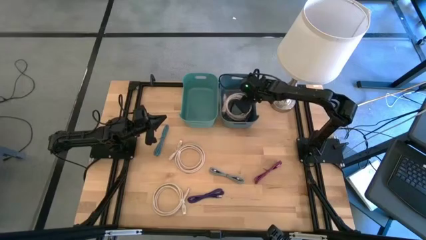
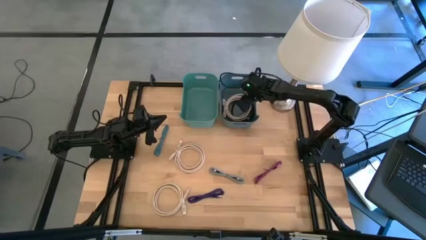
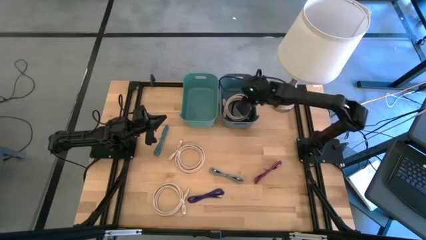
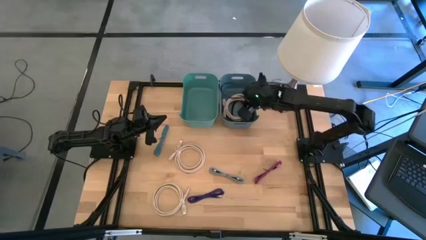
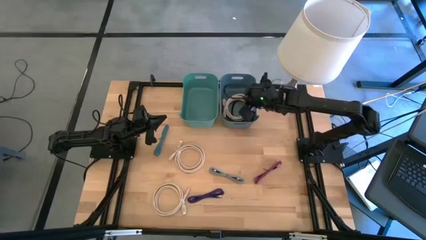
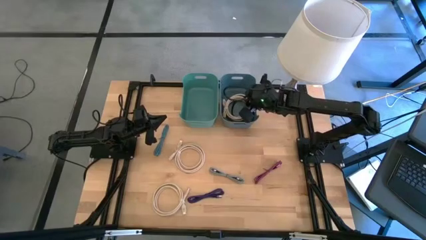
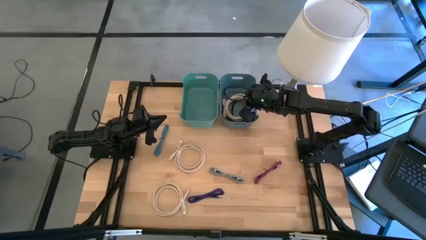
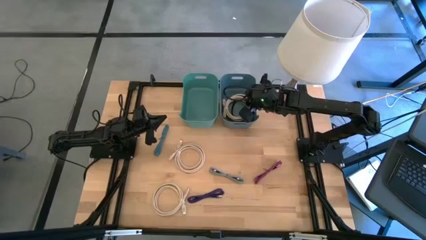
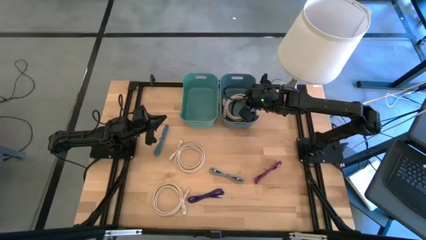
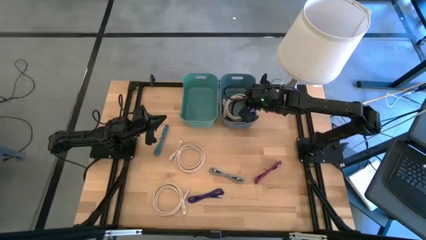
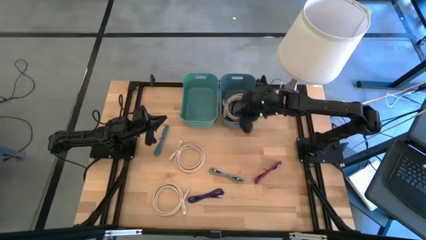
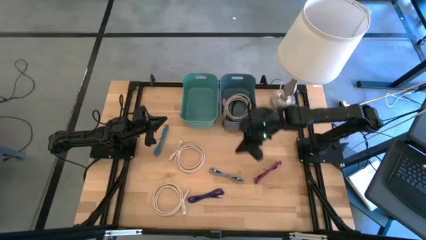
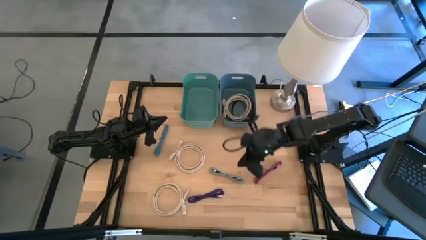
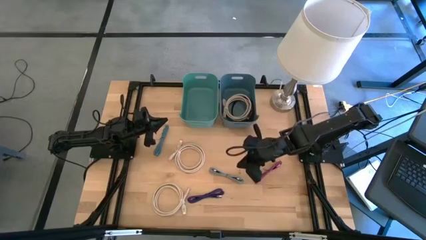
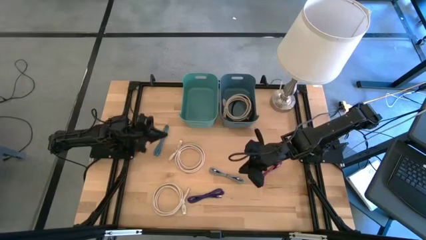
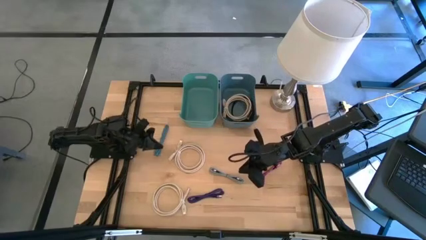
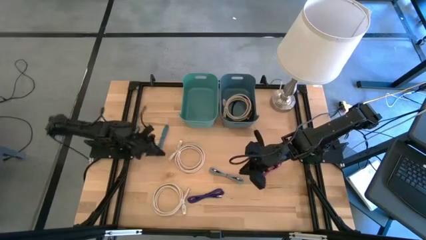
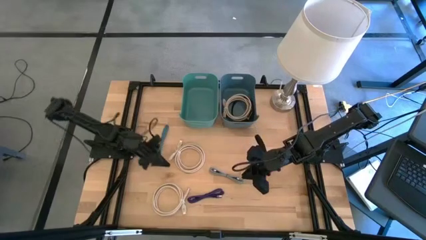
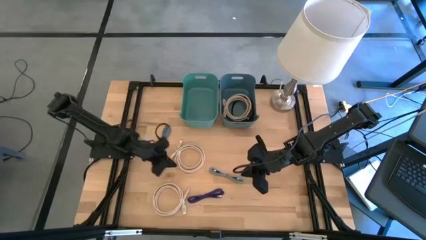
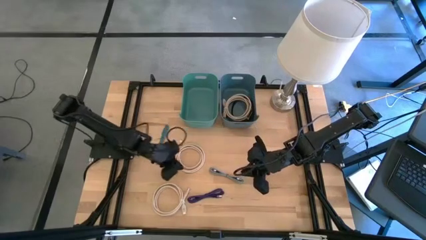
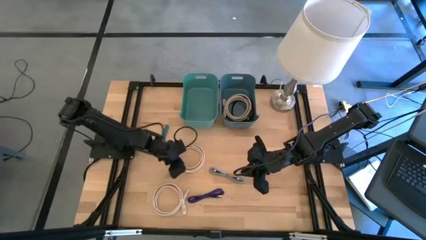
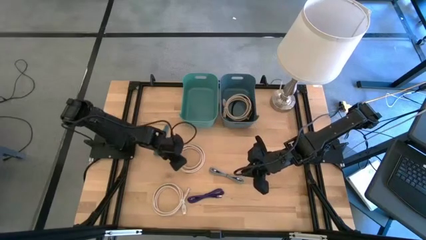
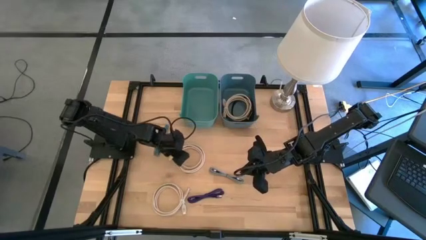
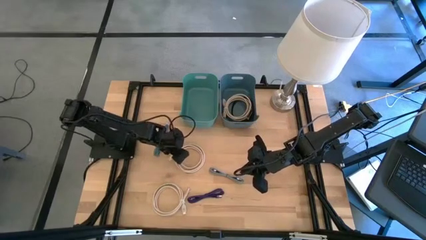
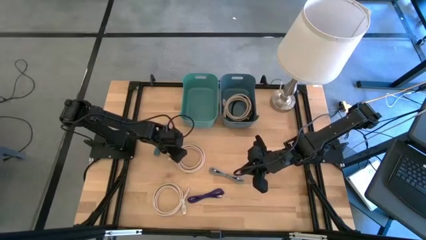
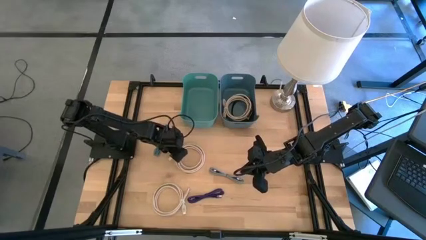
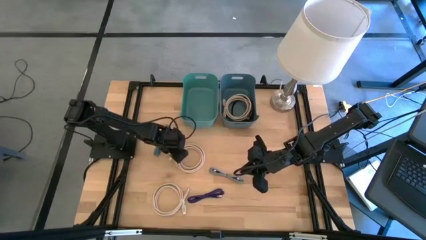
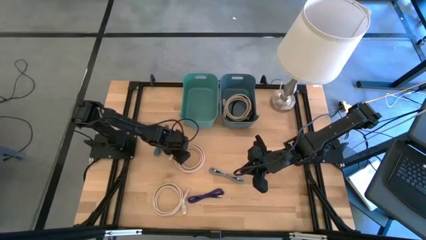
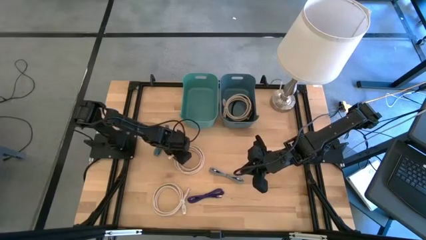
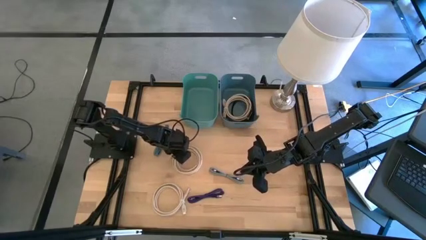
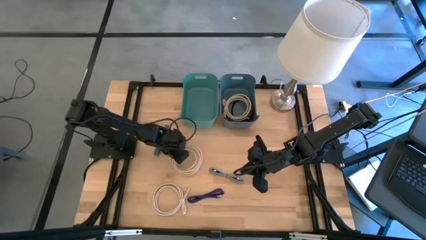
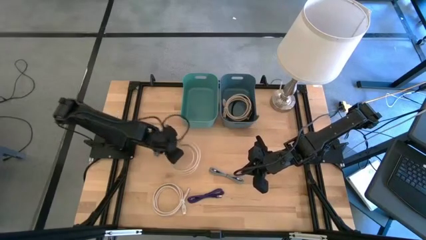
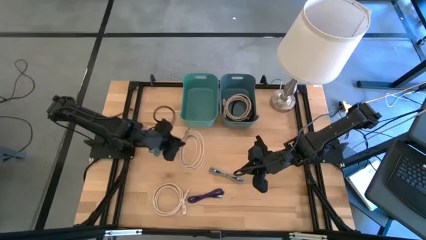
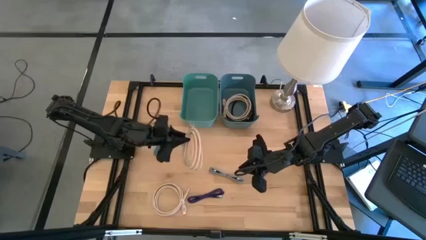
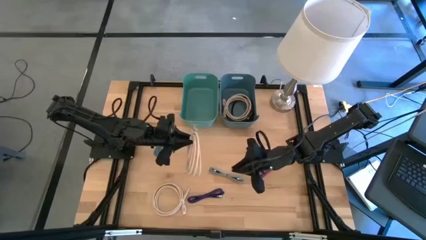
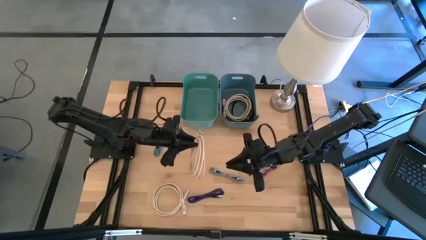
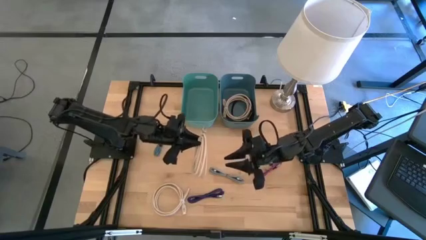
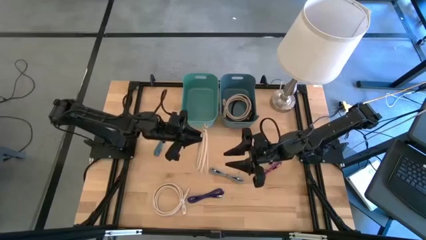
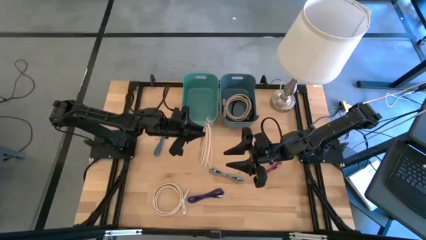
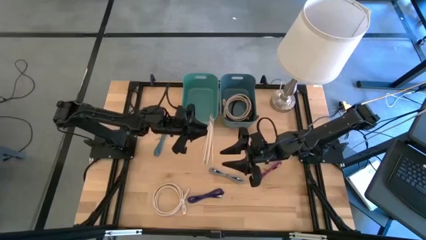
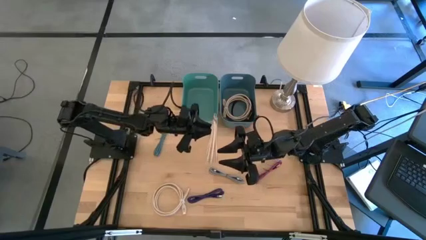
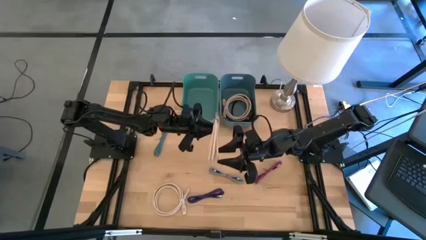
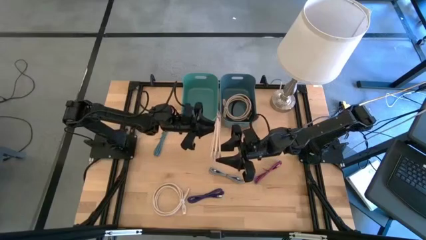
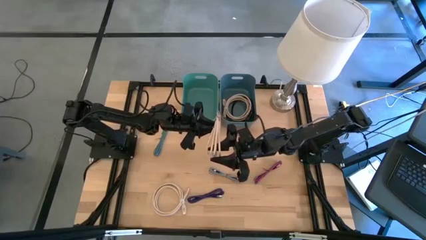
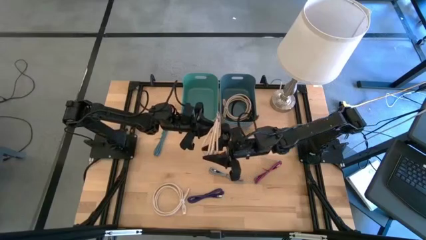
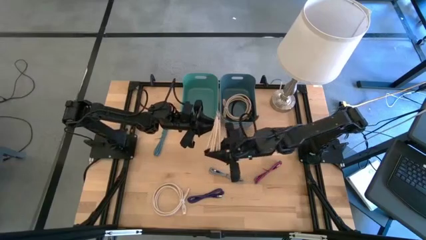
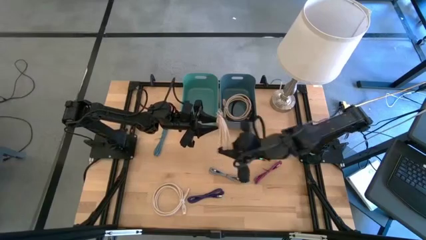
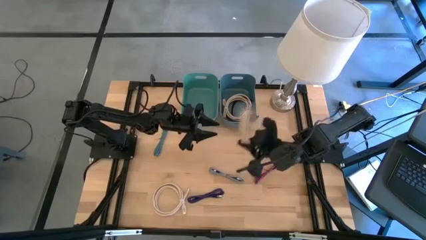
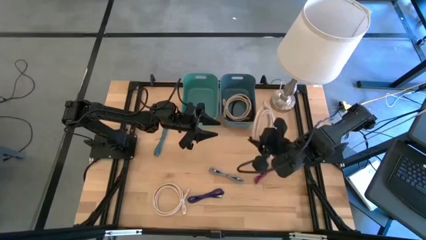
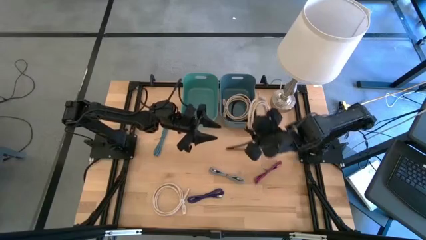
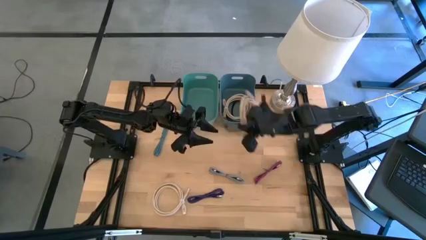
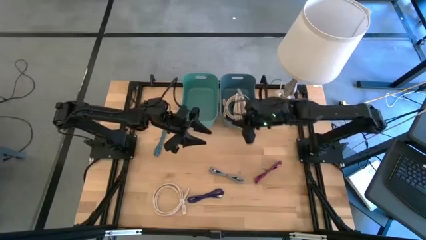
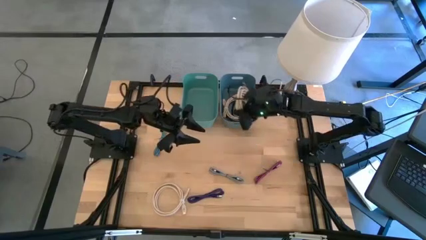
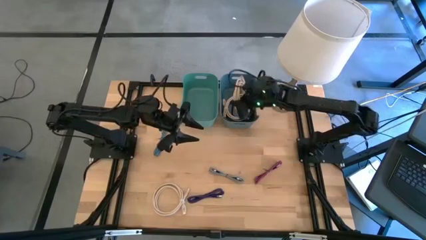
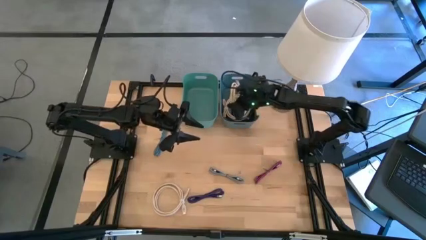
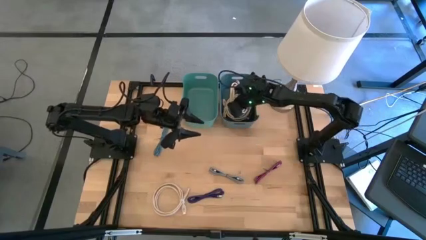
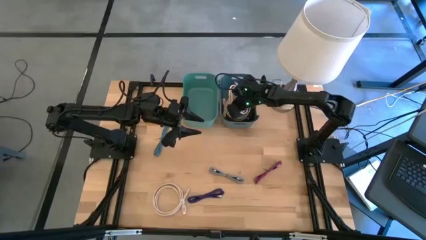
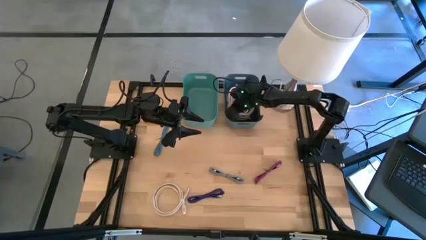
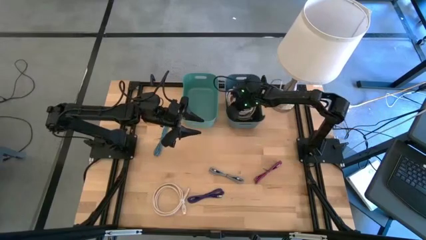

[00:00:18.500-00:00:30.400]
Put the top white HDMI into the blue bin
